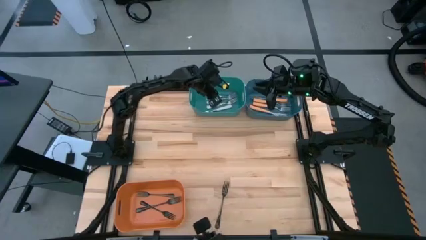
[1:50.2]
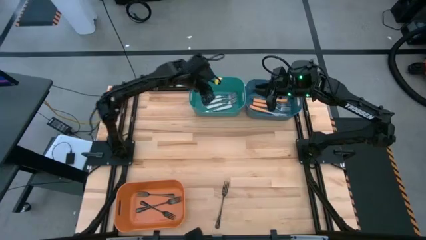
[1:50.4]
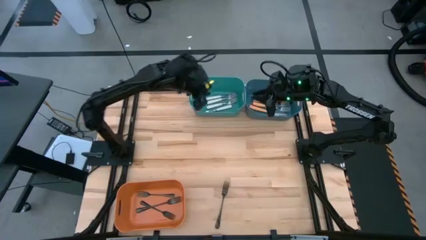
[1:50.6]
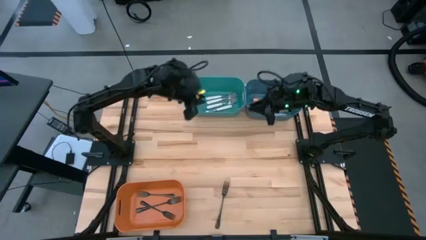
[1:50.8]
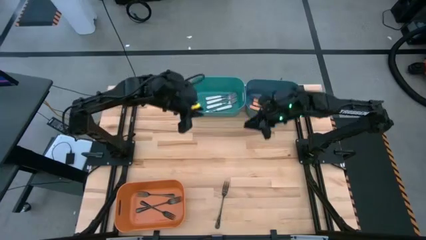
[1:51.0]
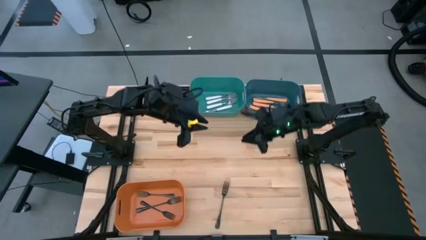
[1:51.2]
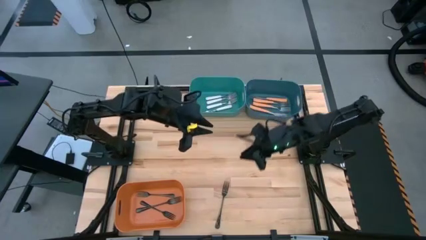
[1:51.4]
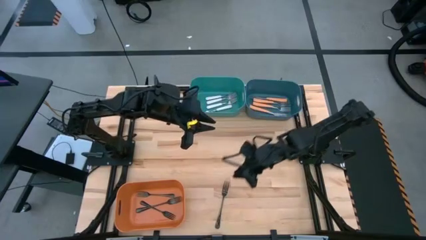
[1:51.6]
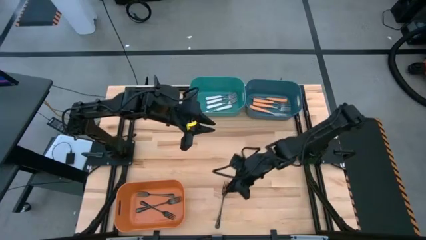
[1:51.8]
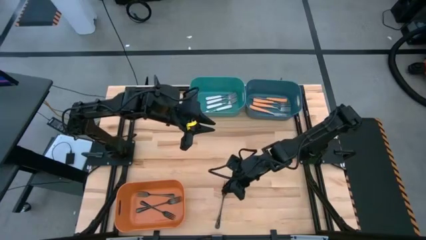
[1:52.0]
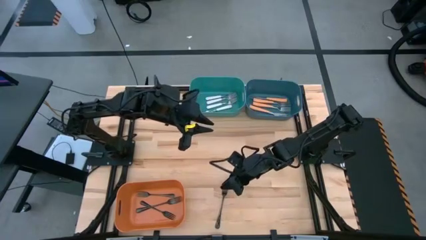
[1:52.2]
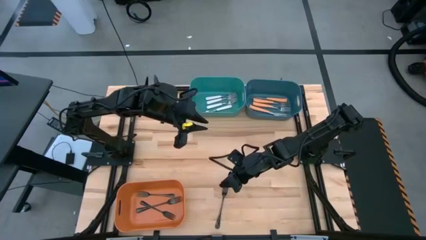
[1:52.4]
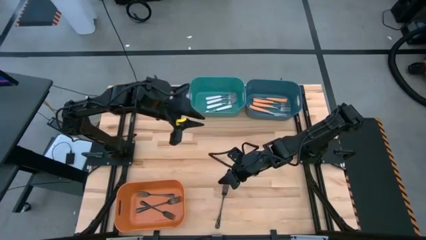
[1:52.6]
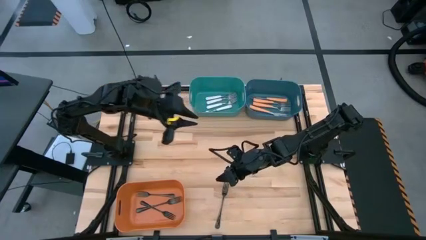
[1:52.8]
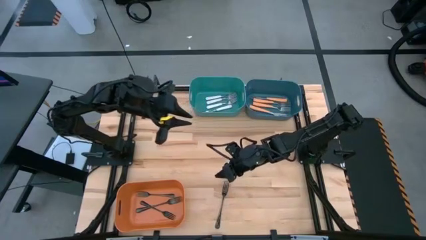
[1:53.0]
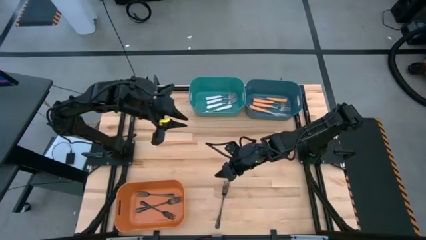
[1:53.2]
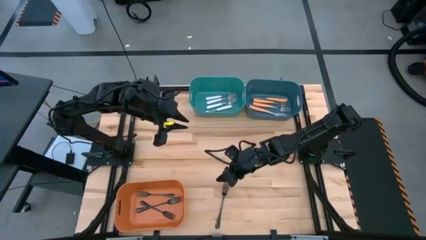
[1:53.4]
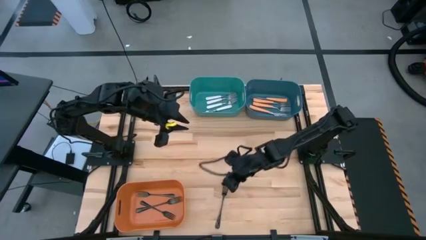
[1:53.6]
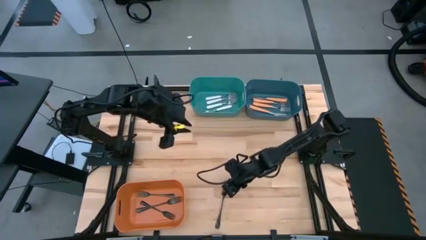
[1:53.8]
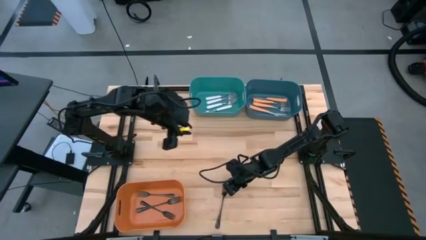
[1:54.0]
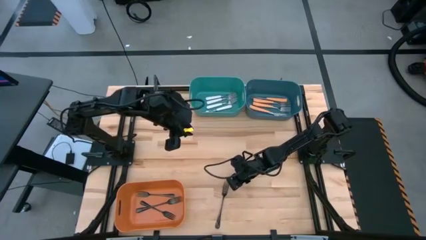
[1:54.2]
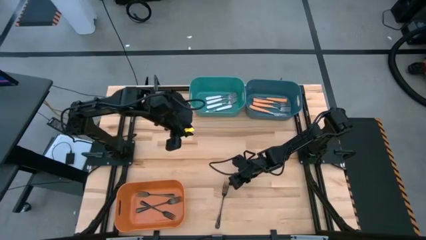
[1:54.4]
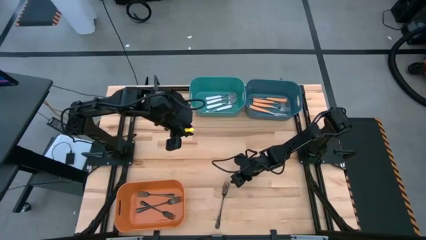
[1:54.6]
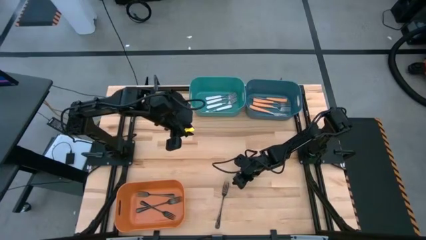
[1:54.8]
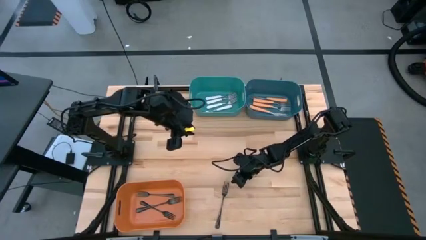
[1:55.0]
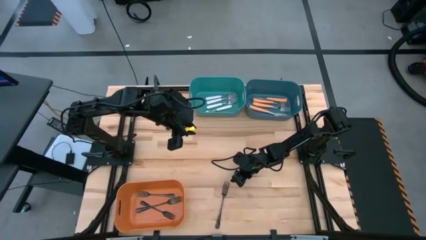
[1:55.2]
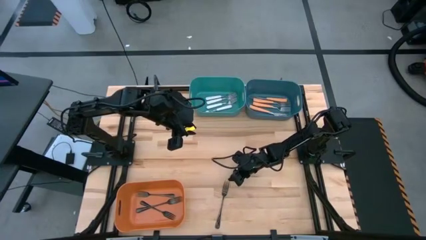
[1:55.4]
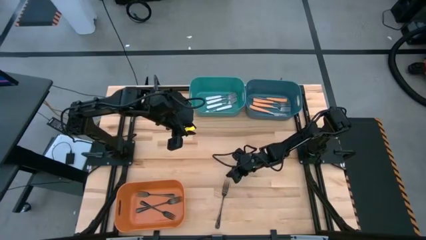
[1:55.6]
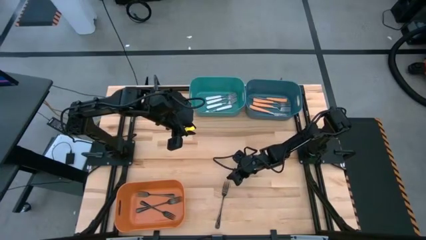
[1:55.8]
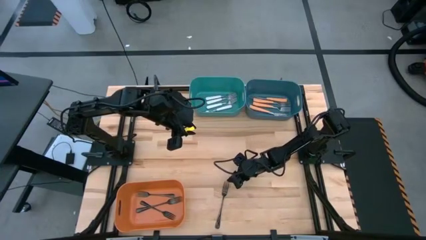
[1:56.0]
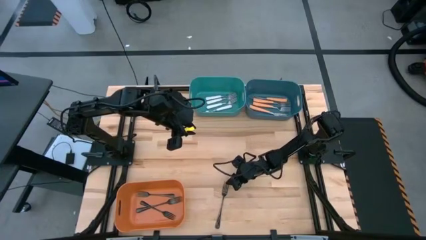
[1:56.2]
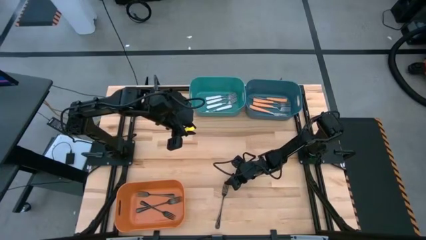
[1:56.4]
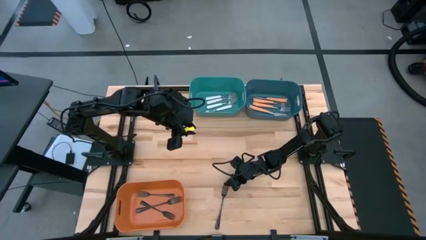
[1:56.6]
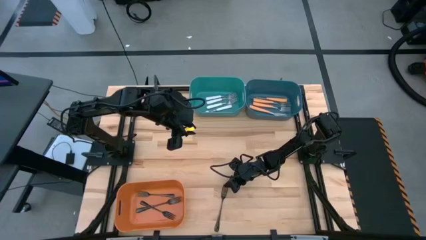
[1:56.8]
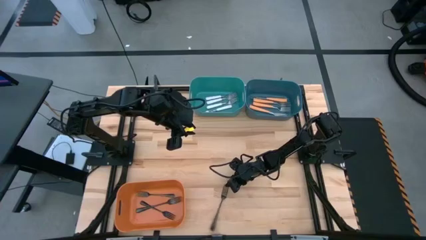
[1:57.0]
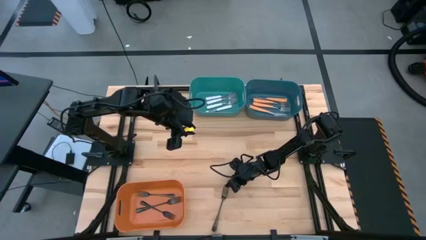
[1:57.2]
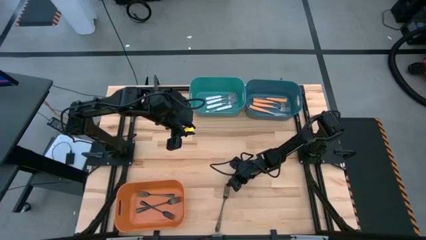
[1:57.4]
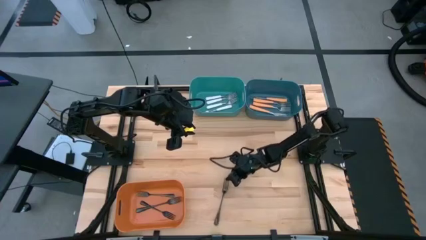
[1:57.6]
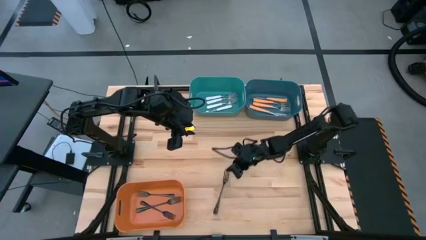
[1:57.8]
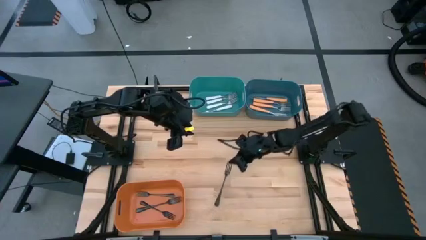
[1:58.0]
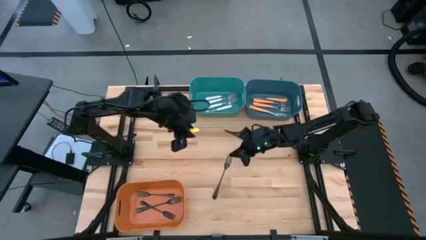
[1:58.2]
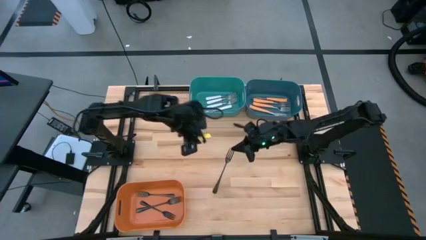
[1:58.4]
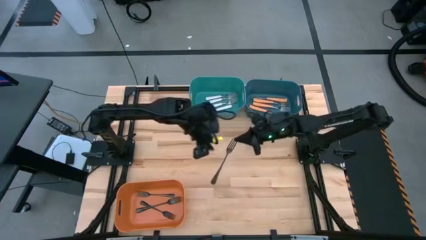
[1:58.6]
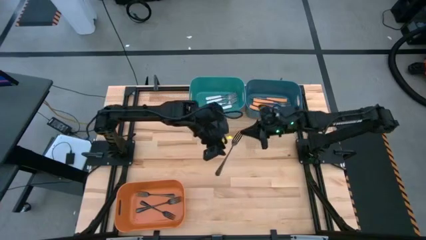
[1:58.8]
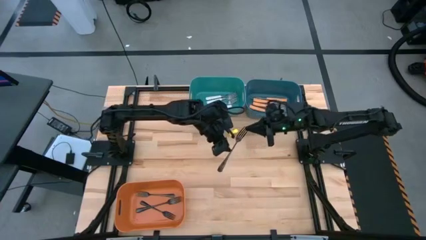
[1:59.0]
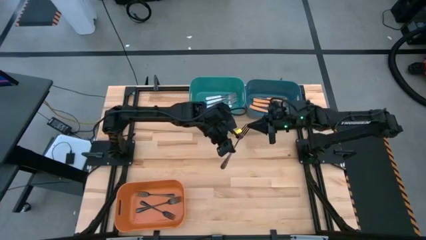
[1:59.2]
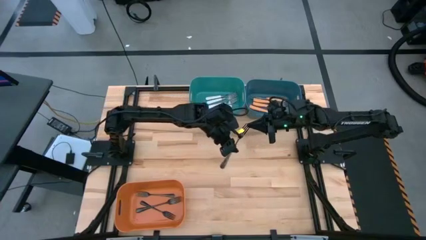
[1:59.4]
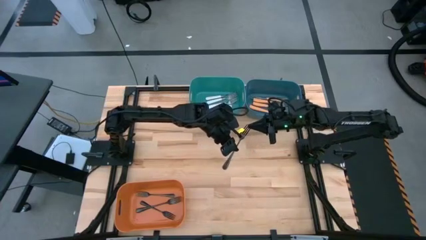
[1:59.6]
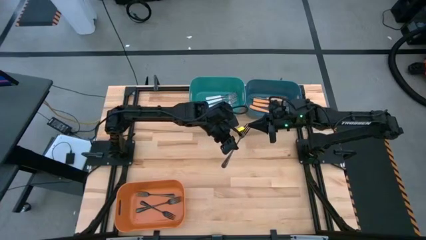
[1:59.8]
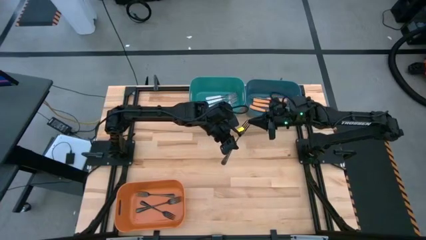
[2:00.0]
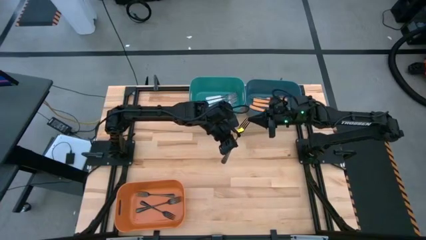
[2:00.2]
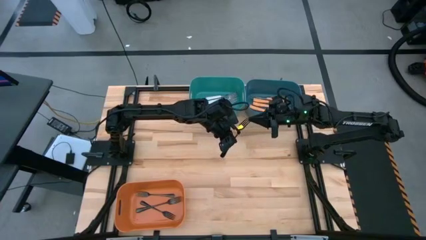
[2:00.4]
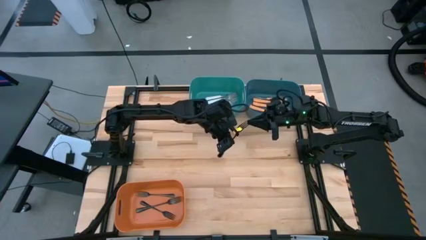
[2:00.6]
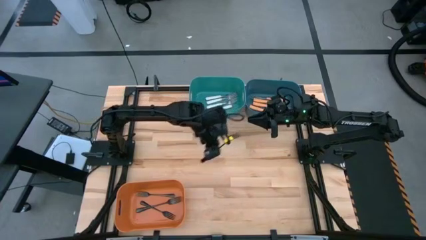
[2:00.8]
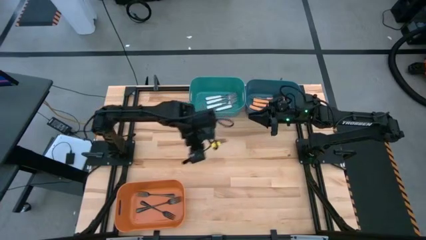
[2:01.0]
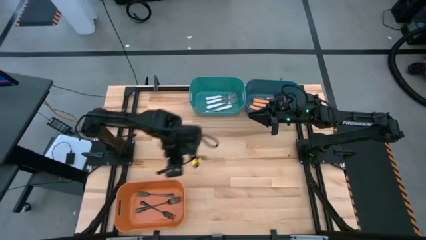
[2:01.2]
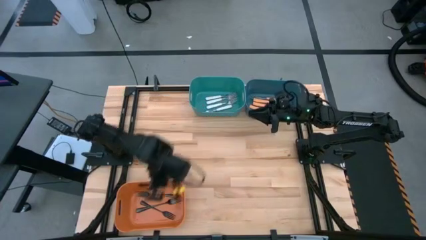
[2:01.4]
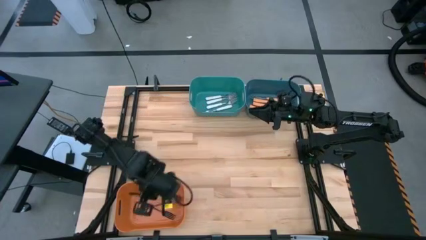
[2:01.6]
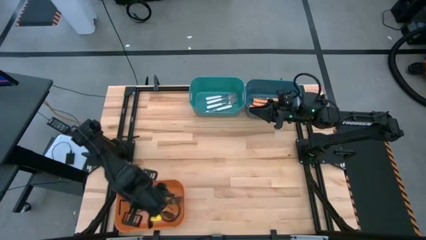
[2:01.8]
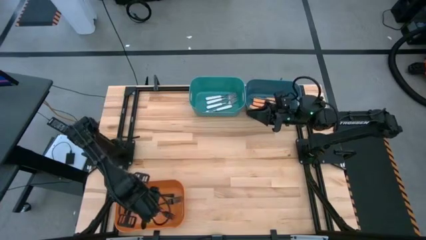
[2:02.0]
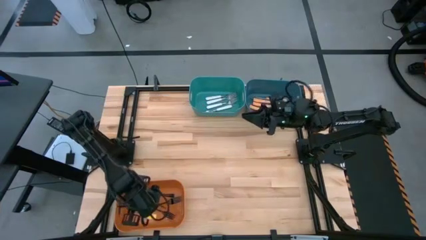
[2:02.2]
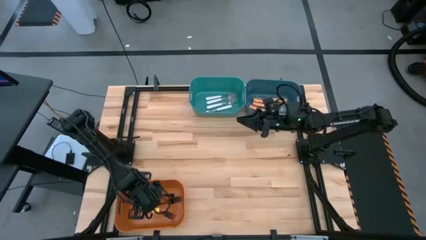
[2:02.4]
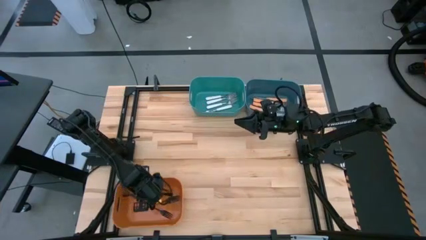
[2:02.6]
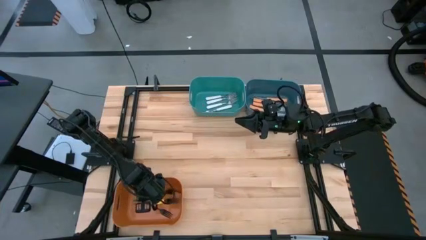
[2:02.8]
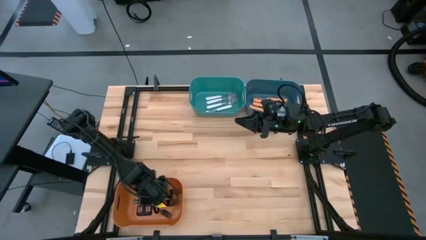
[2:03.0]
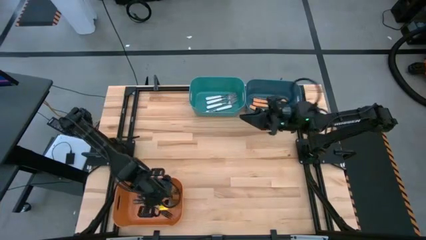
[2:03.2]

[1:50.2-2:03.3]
Task: Sort silverware by color (type)
Put the black fork into the orange bin

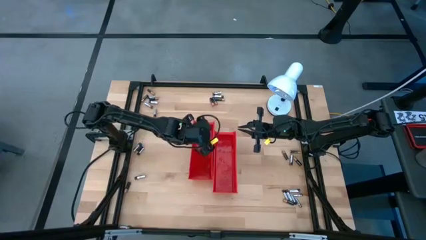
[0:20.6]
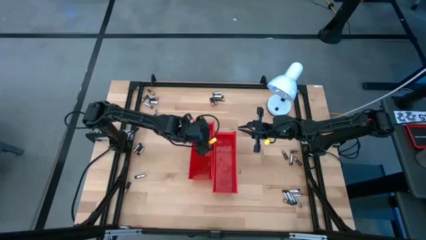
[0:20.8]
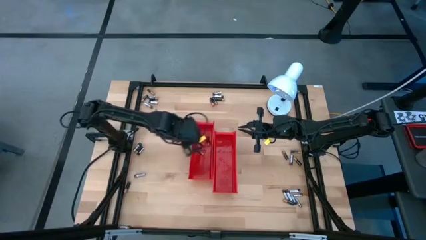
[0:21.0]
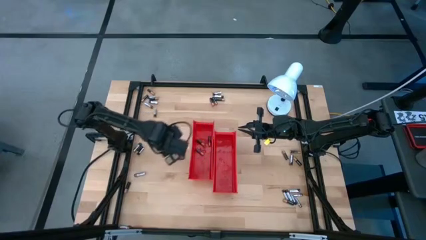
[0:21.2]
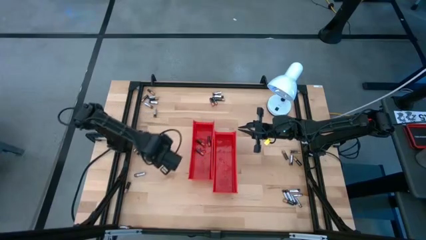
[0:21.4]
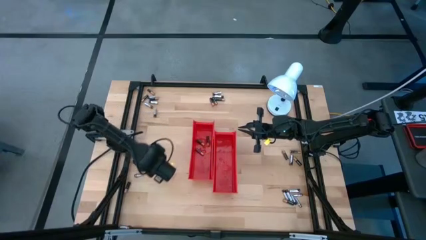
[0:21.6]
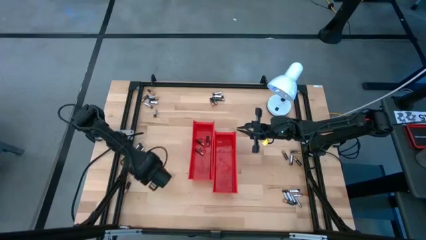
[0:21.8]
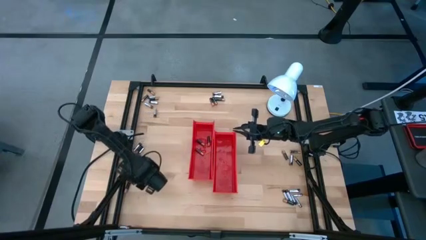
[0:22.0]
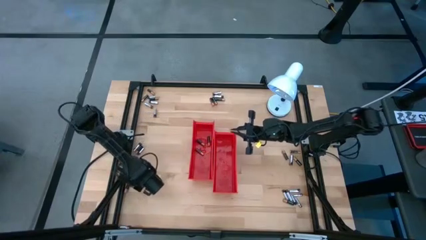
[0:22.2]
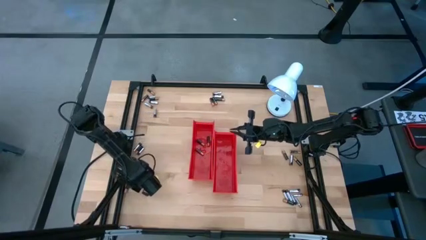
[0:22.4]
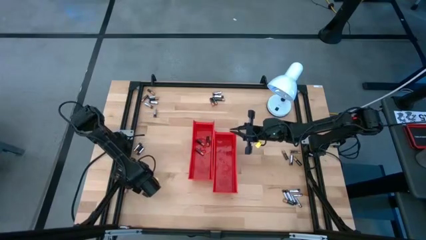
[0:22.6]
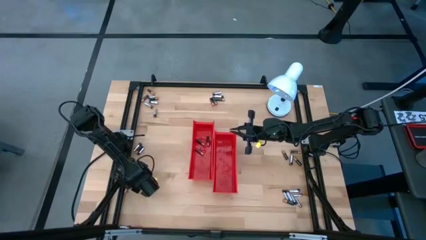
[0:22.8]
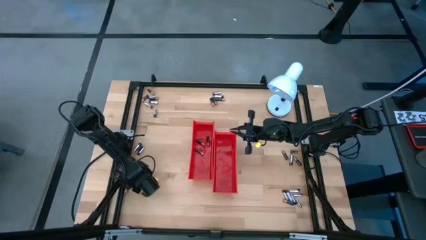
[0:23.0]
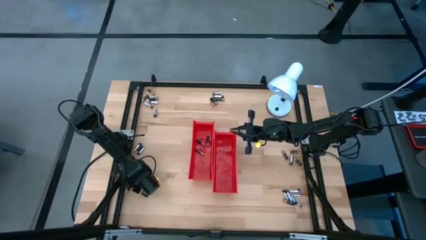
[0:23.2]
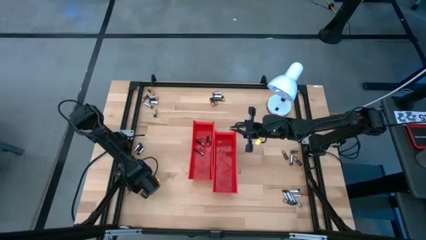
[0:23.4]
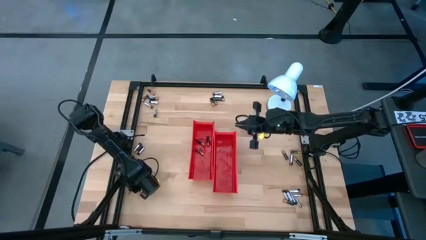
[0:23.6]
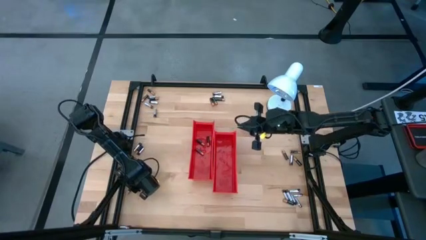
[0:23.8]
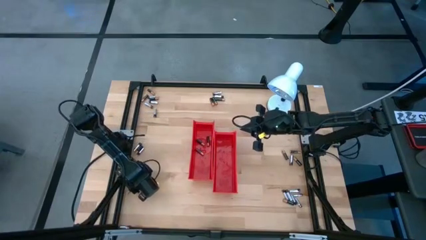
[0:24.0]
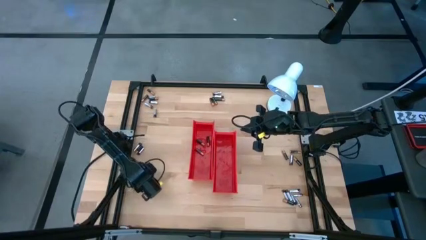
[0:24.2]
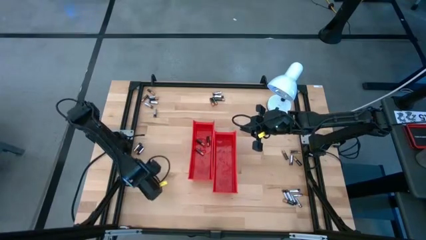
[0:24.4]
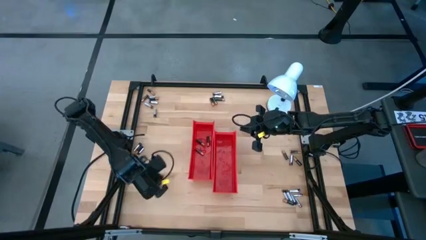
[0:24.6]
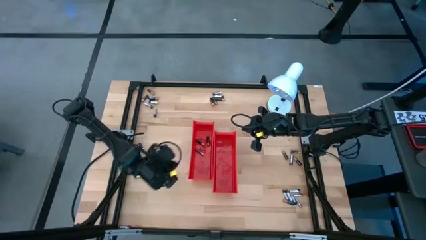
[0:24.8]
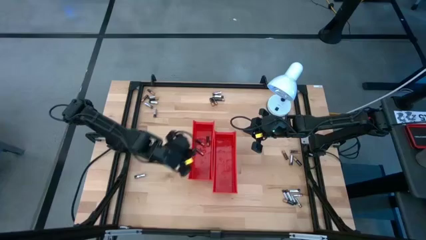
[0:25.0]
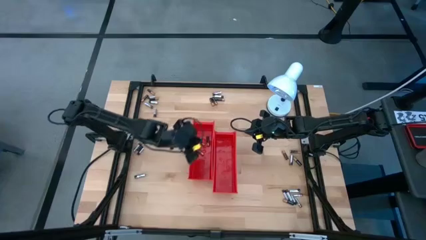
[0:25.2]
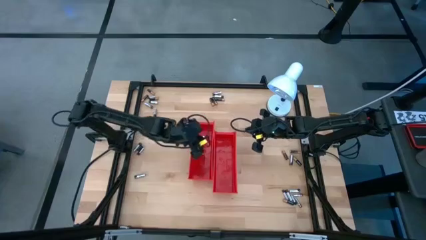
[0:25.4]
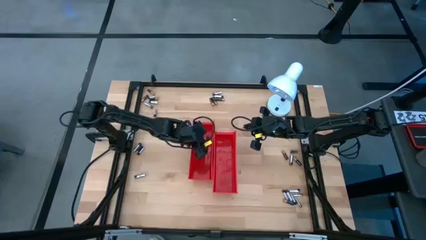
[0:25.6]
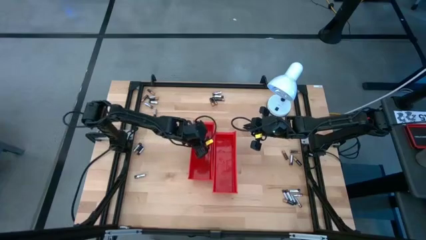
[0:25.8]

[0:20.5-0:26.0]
Task: Sort batteries
Put the black battery into the left red bin
